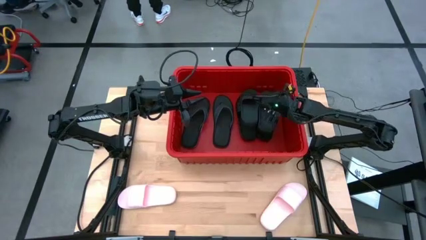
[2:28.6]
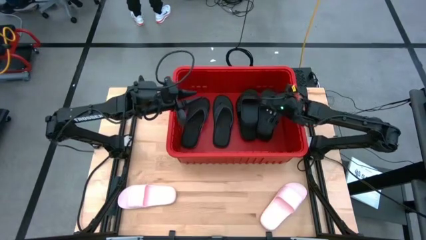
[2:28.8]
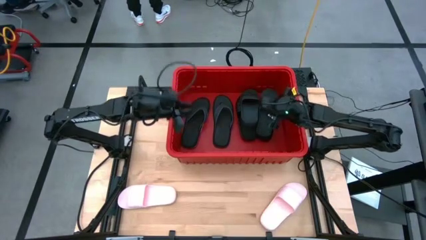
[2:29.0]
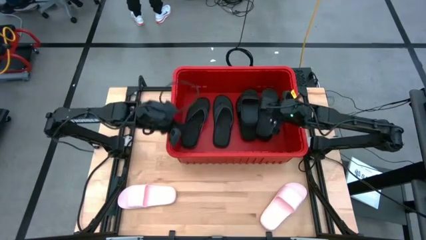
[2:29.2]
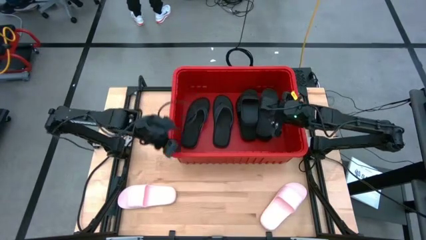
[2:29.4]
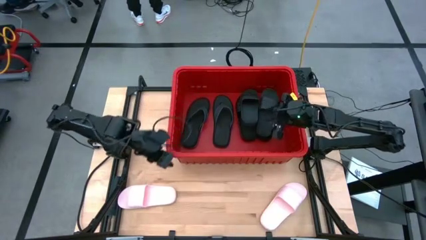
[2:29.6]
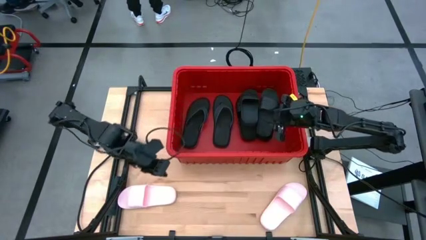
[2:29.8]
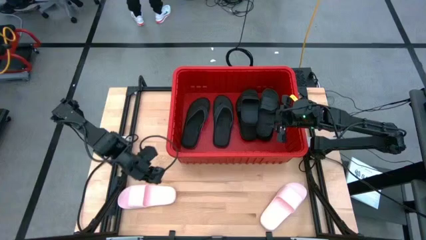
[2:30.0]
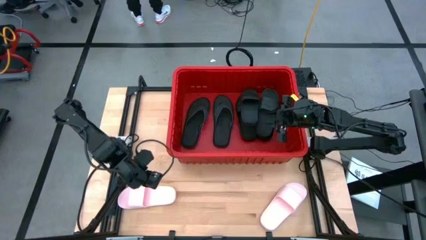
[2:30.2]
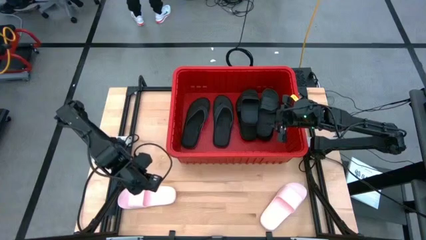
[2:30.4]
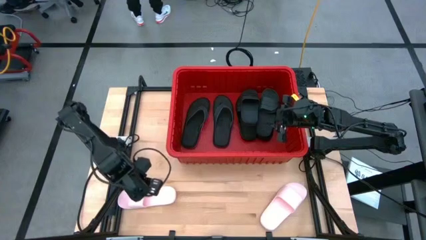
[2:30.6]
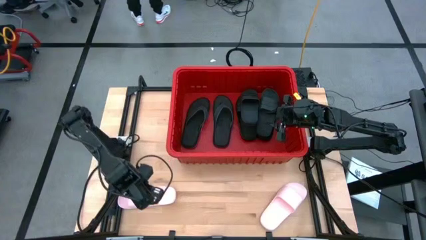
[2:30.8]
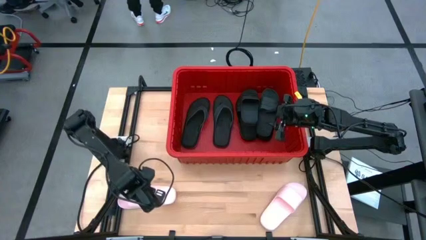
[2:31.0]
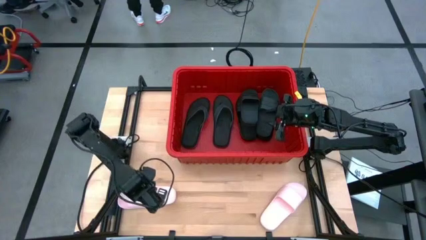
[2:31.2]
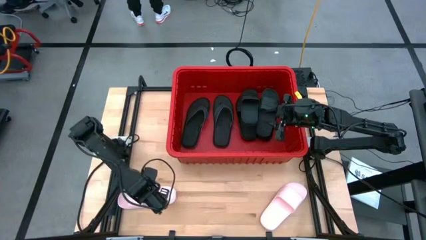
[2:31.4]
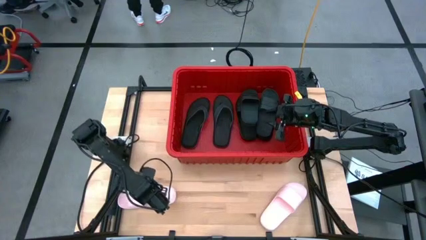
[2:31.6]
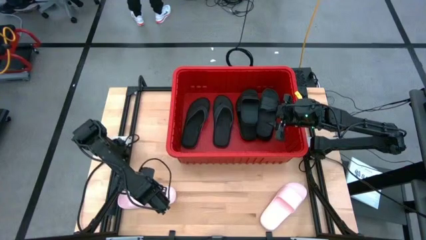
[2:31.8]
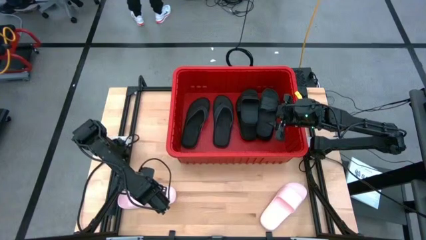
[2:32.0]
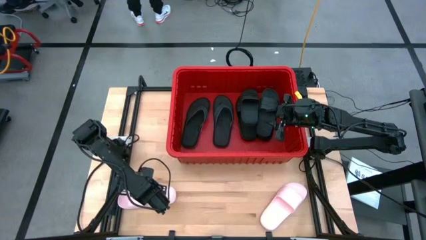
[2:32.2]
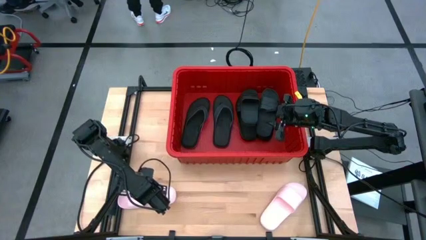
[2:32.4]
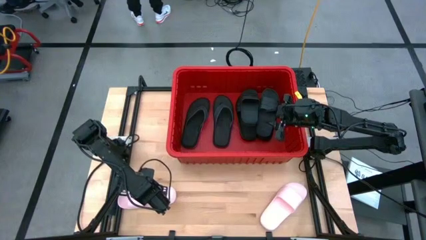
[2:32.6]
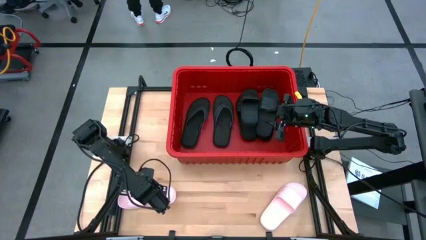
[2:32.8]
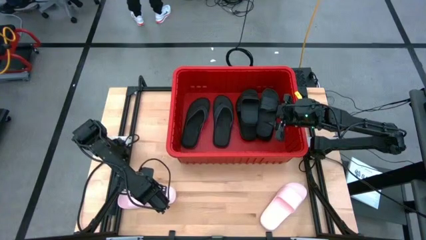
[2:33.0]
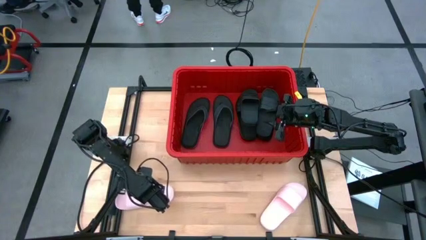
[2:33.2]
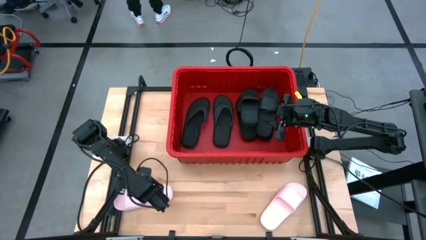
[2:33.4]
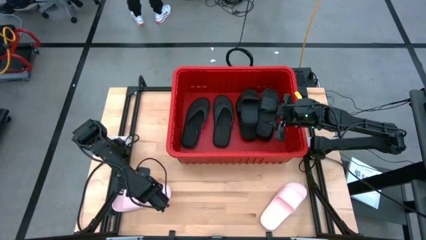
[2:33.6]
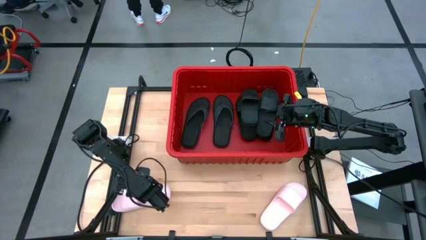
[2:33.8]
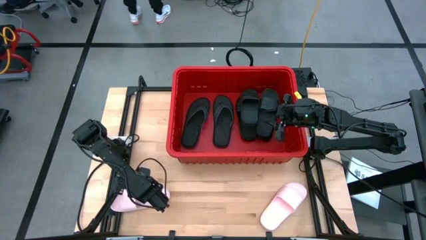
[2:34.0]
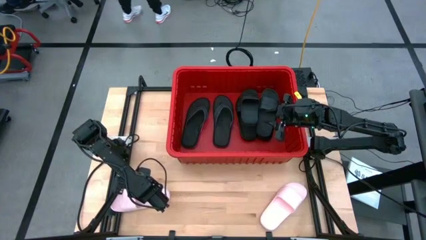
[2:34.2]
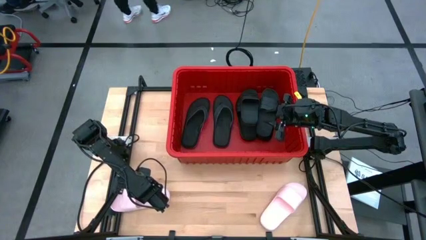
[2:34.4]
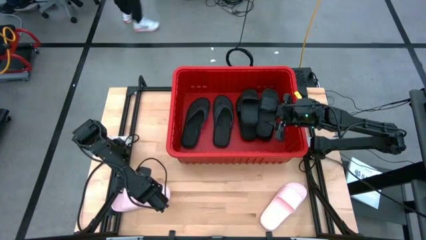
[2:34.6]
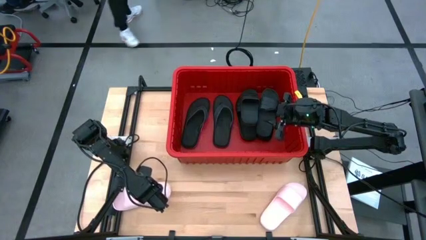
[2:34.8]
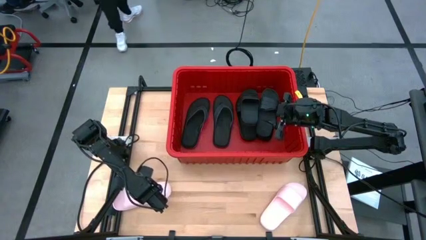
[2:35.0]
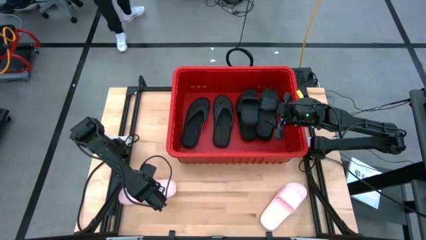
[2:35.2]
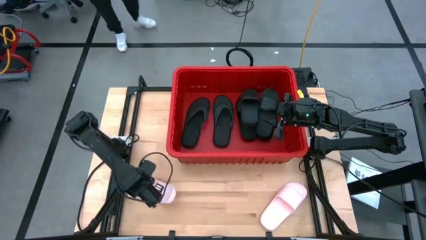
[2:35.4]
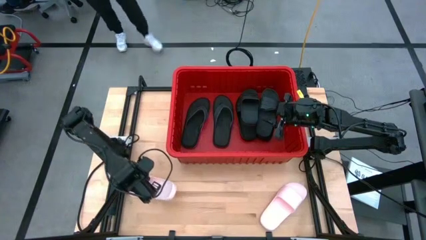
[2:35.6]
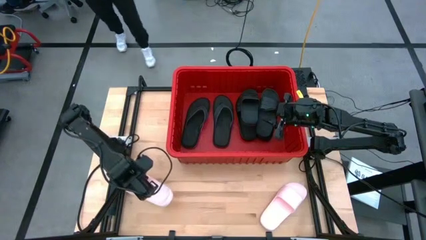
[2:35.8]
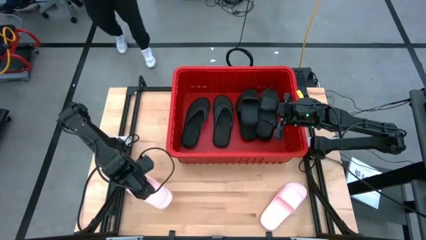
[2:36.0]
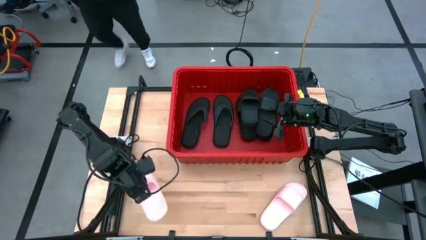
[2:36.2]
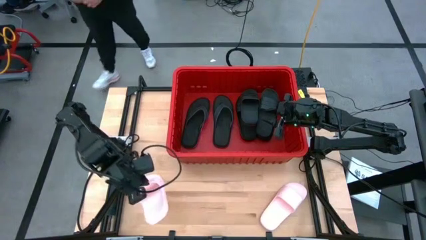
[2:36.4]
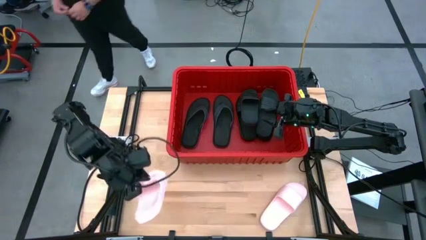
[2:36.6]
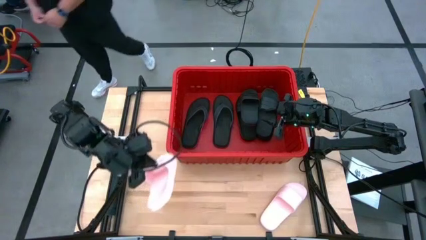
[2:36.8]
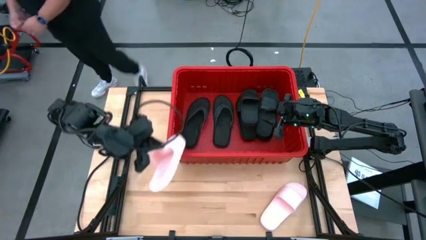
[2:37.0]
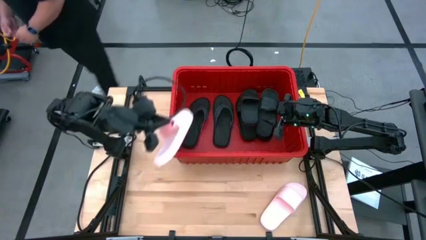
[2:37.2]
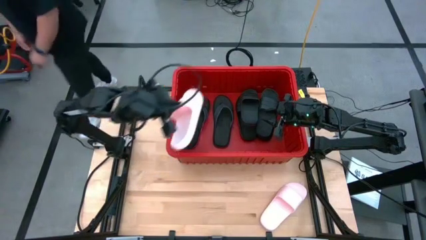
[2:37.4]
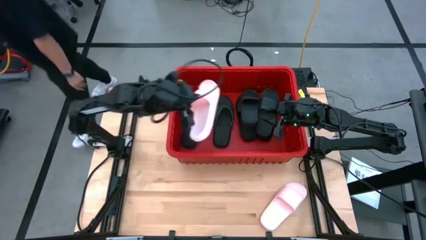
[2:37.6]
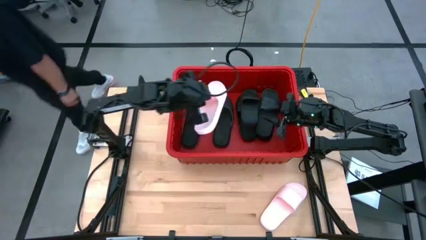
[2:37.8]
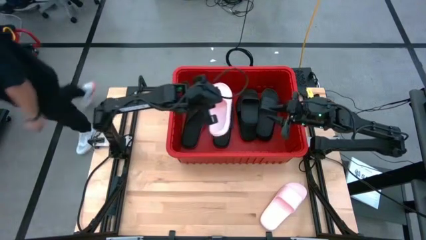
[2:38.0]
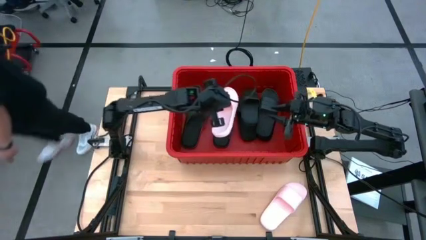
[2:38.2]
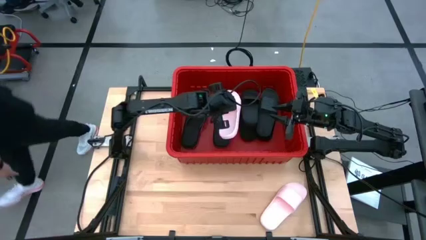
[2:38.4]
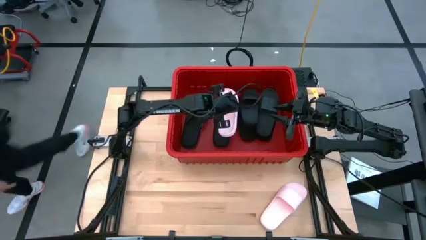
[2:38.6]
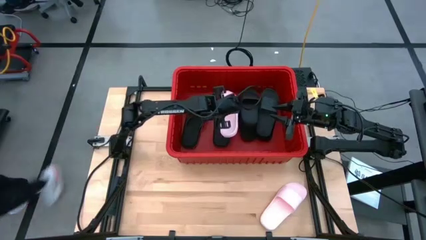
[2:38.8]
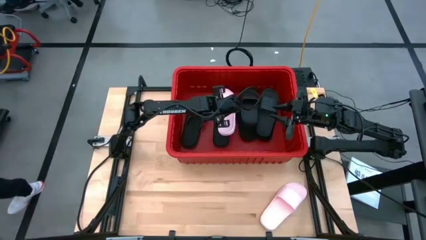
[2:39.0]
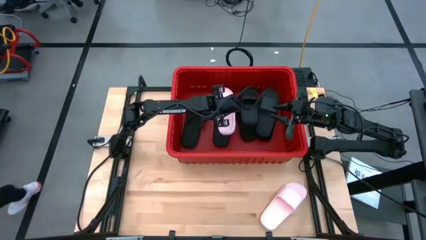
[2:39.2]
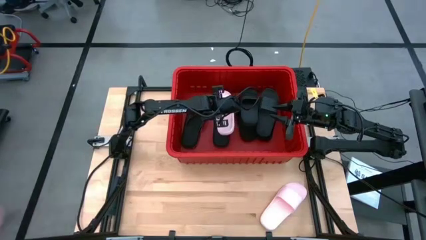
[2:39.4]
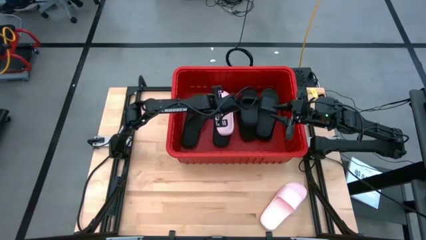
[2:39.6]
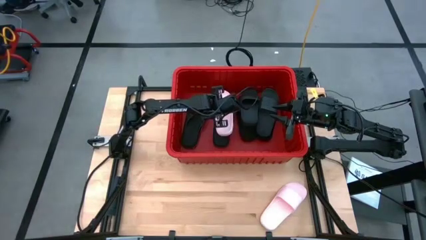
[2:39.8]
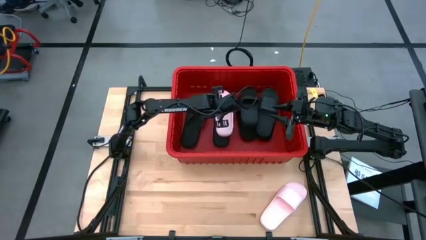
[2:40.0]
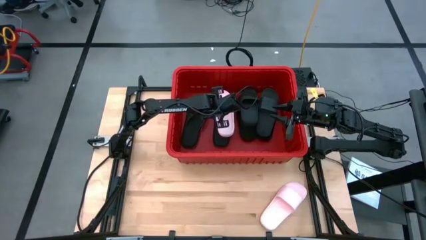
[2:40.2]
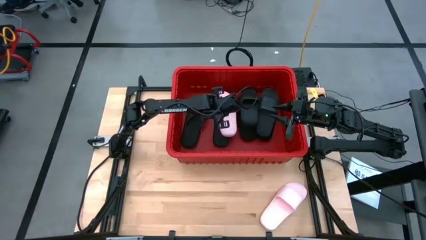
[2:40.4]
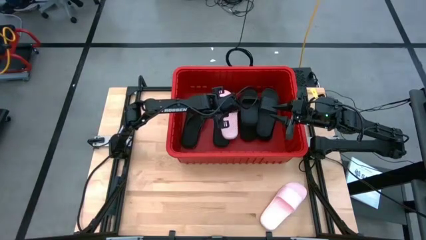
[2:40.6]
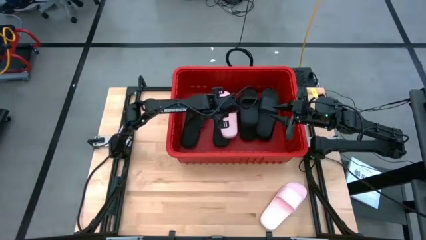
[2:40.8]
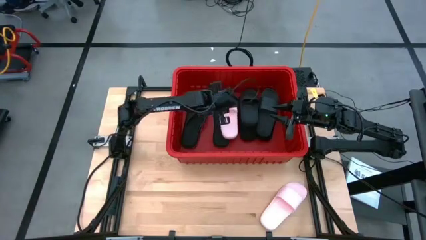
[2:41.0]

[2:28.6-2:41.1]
Task: Pick and place slides into bin
Put the pink slide into the red bin

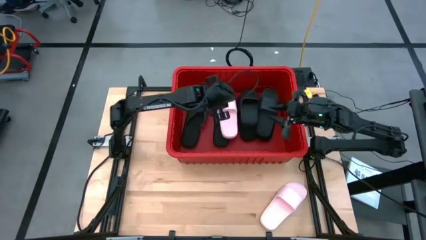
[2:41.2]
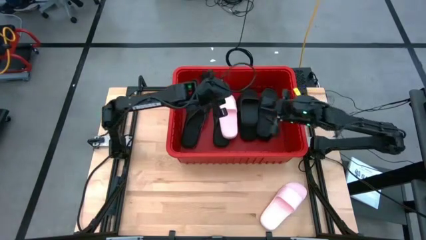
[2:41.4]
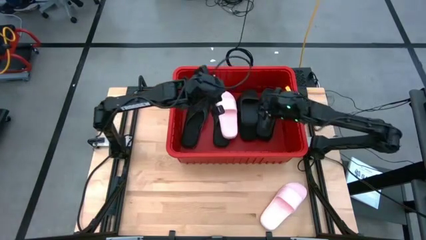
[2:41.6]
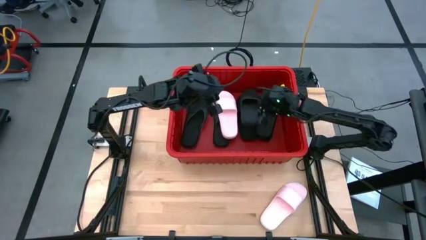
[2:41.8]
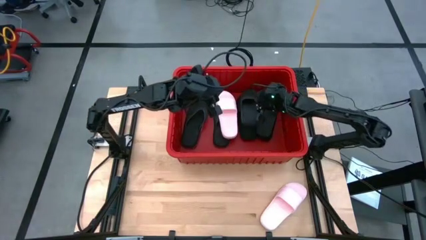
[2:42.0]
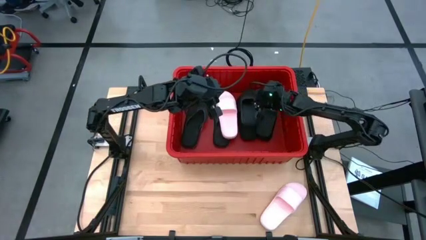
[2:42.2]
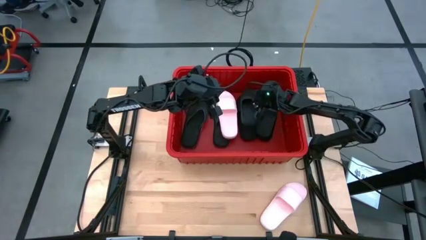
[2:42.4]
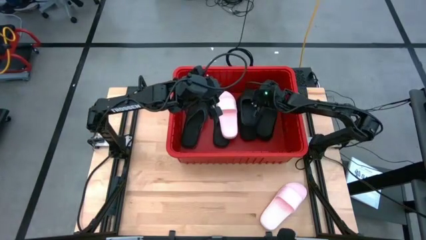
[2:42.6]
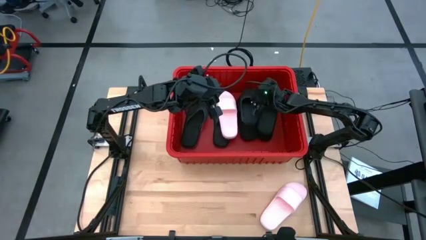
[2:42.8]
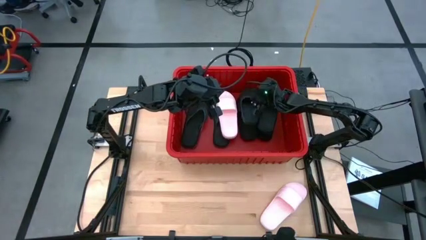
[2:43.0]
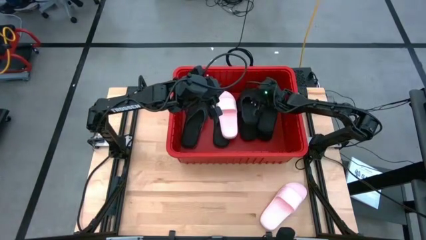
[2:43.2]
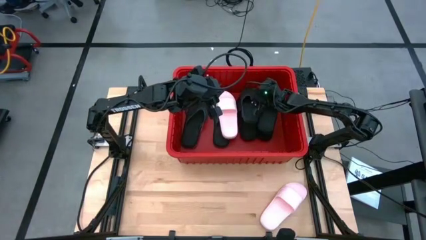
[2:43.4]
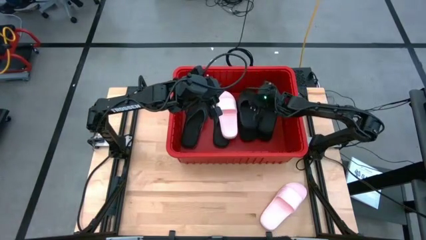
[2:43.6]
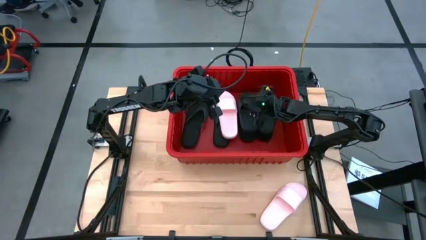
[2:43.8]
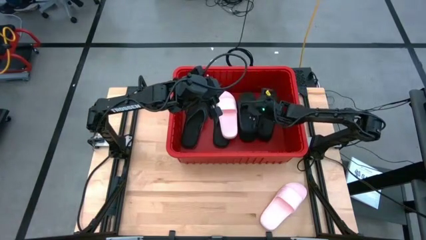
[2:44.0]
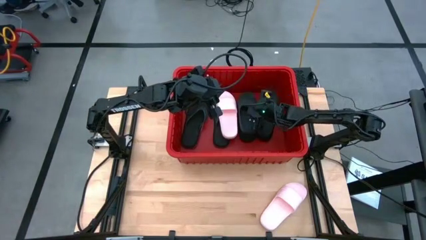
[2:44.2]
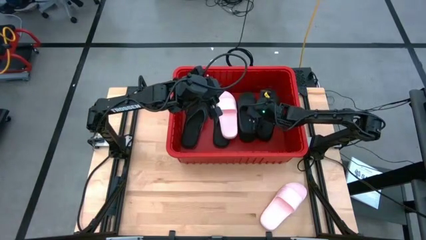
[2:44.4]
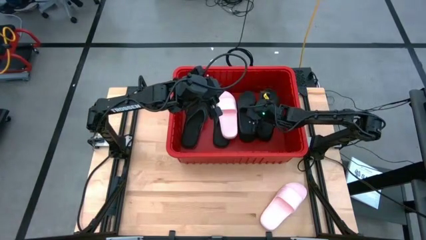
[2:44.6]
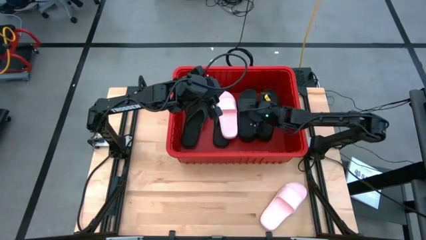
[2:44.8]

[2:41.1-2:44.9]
Adjust the black slide in the red bin

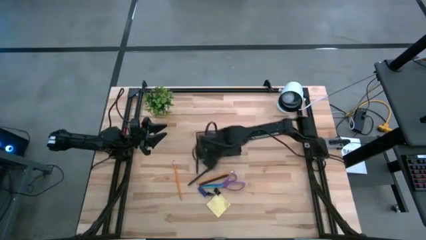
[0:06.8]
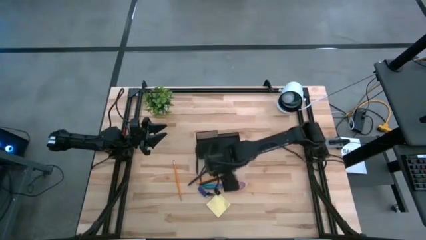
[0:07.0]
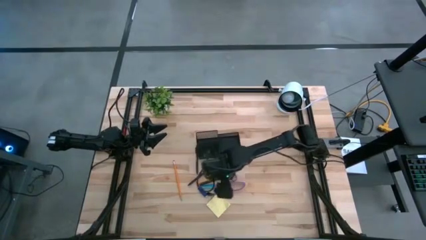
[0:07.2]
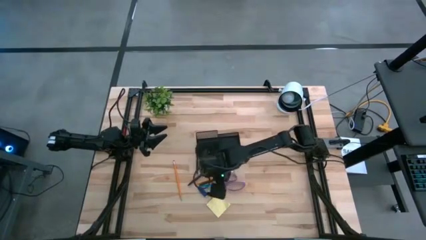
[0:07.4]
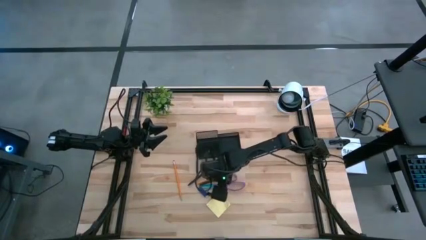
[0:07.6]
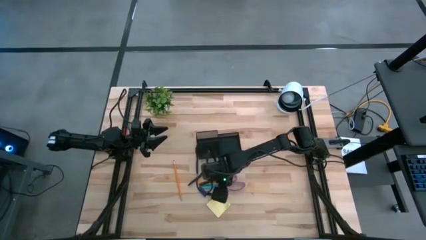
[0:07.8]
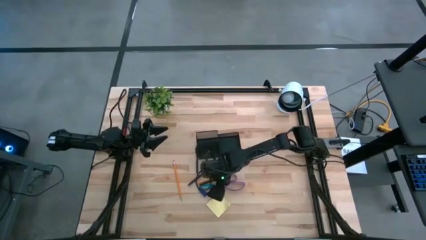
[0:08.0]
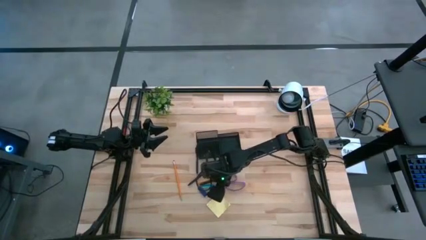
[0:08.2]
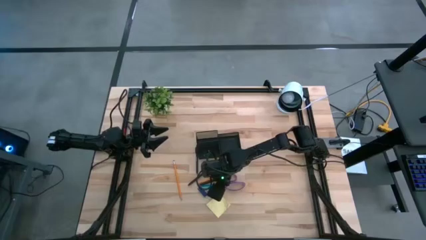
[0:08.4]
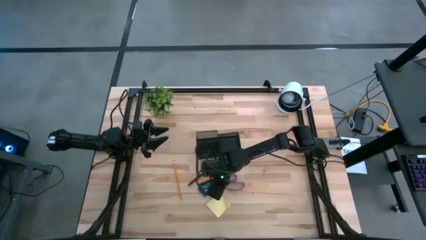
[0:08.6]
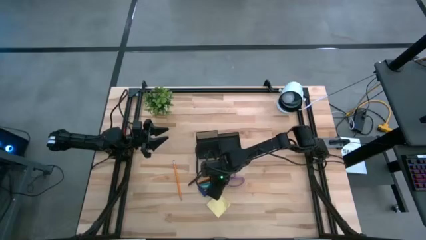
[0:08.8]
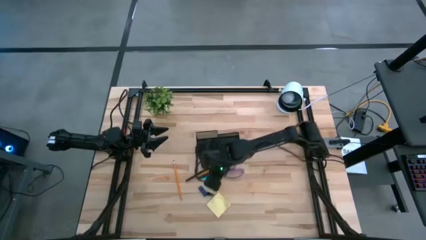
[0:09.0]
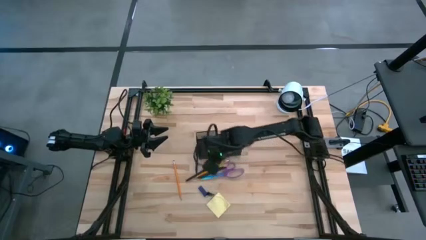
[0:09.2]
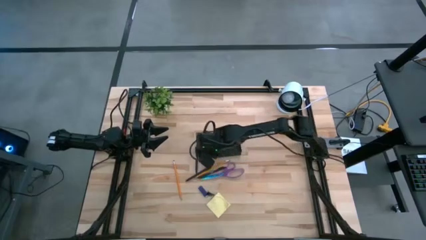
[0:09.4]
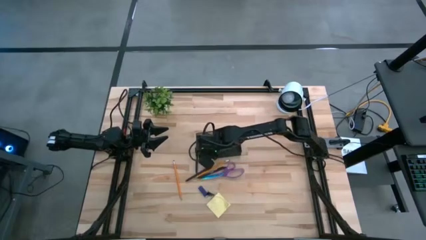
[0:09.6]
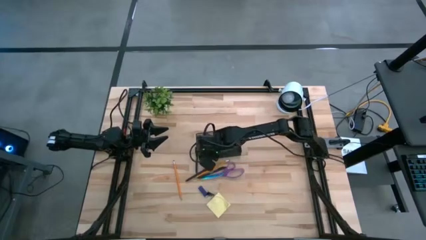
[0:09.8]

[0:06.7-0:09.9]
Task: Pick and place office supplies into organizer
Put the right black binder clip into the black desk organizer
